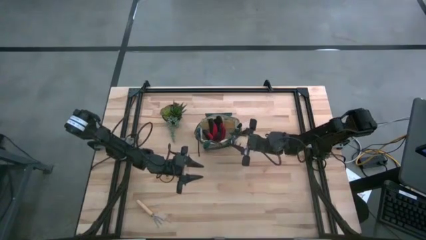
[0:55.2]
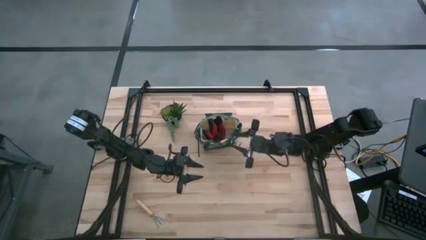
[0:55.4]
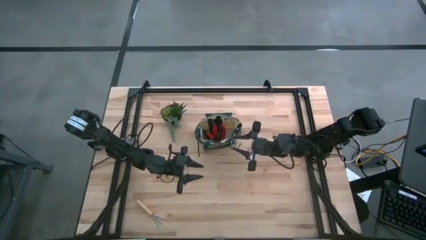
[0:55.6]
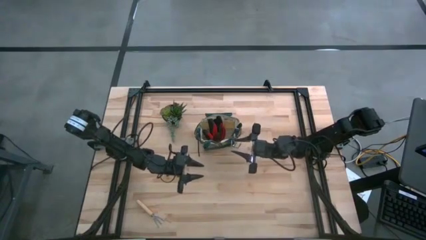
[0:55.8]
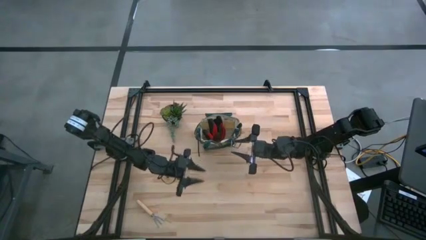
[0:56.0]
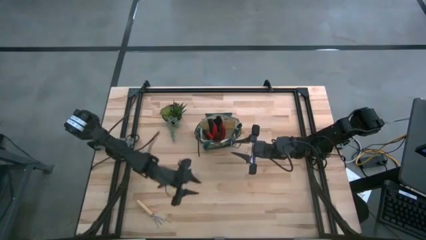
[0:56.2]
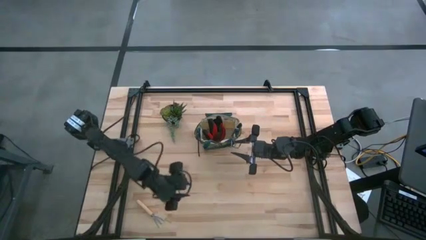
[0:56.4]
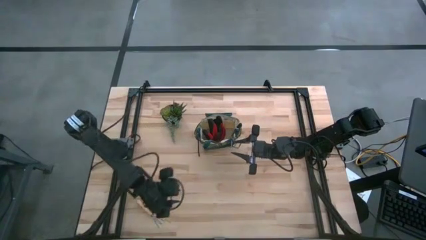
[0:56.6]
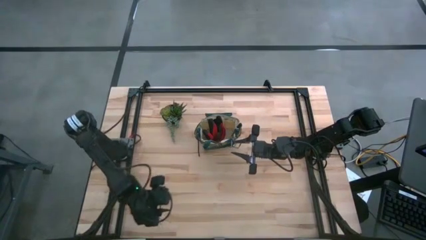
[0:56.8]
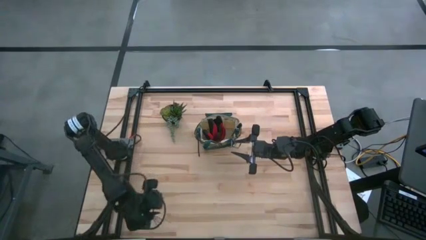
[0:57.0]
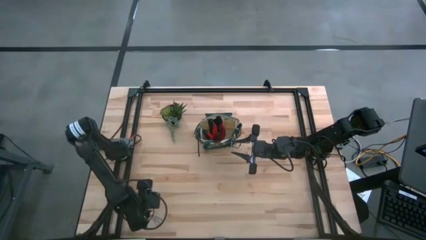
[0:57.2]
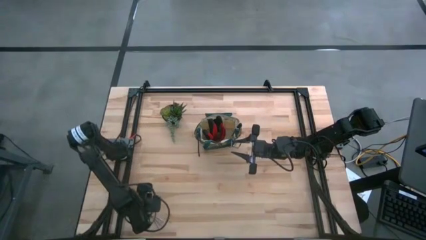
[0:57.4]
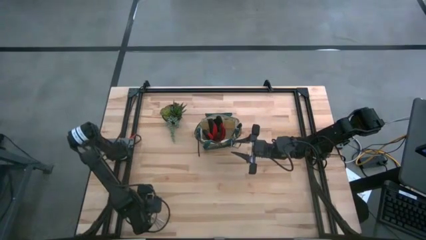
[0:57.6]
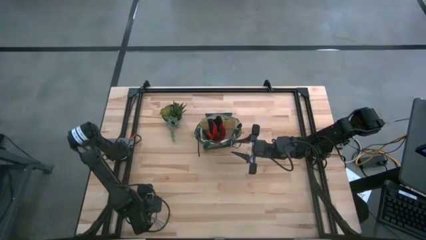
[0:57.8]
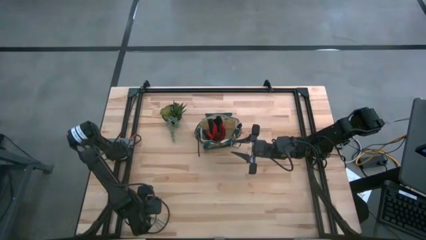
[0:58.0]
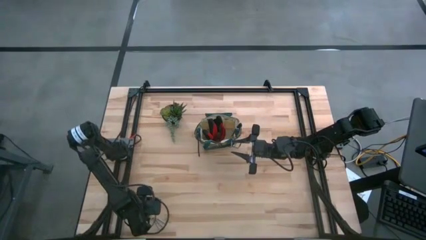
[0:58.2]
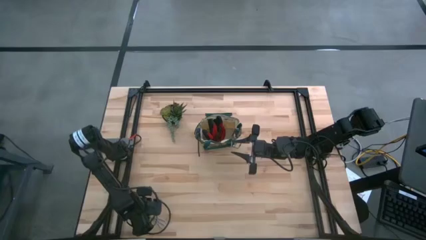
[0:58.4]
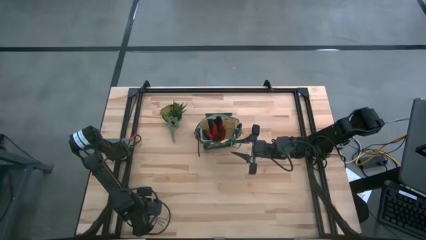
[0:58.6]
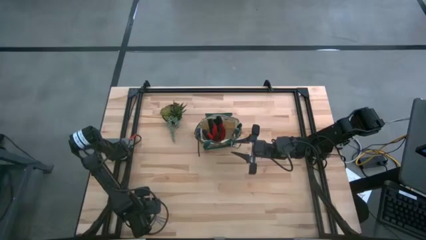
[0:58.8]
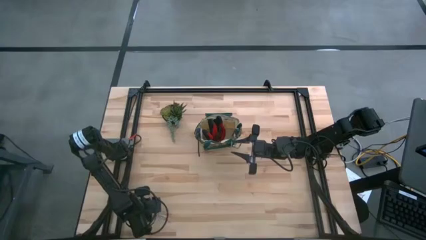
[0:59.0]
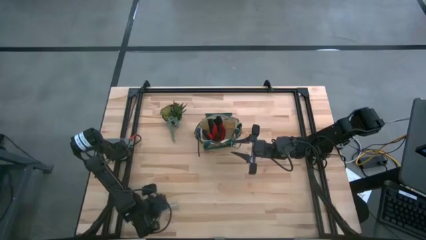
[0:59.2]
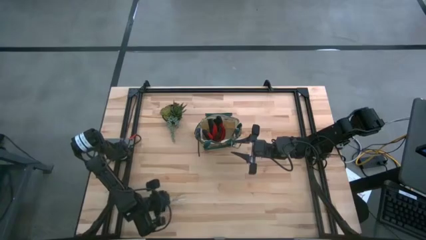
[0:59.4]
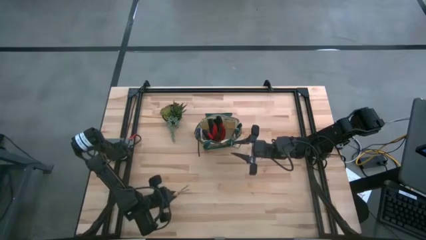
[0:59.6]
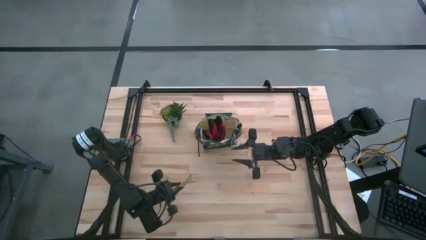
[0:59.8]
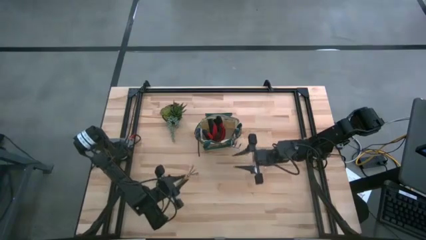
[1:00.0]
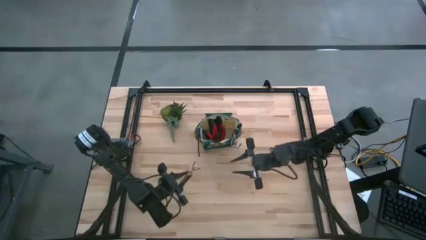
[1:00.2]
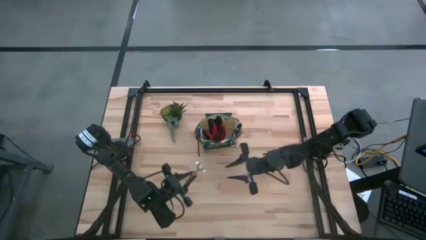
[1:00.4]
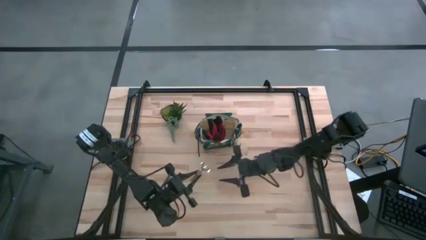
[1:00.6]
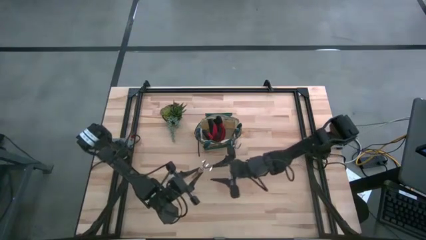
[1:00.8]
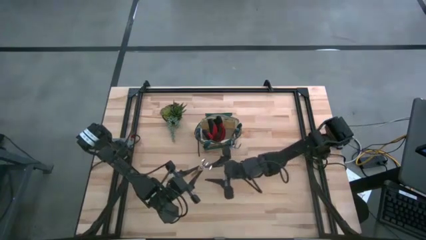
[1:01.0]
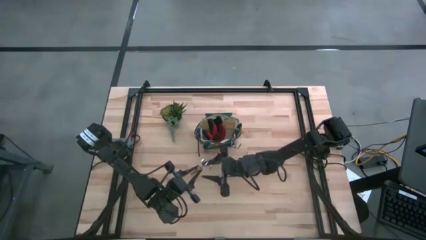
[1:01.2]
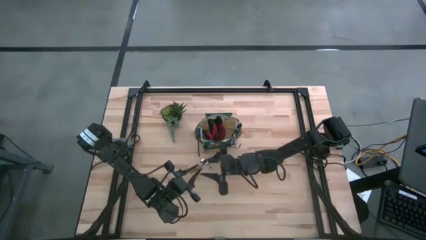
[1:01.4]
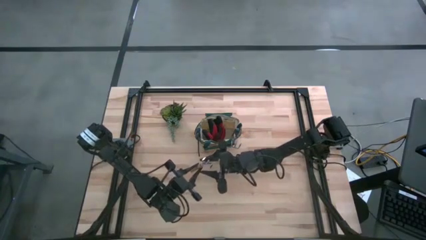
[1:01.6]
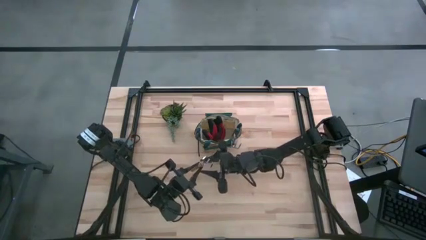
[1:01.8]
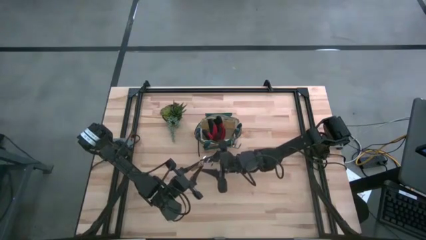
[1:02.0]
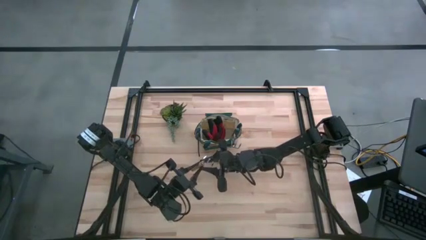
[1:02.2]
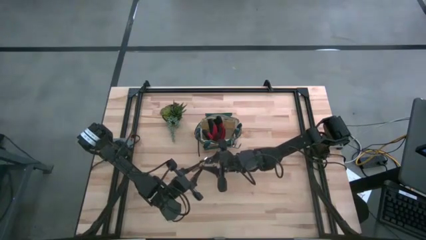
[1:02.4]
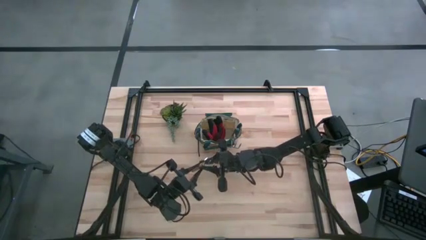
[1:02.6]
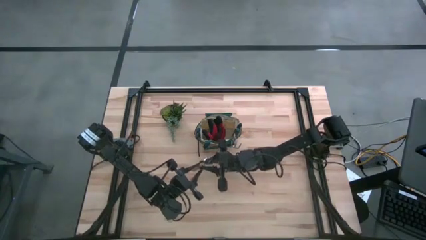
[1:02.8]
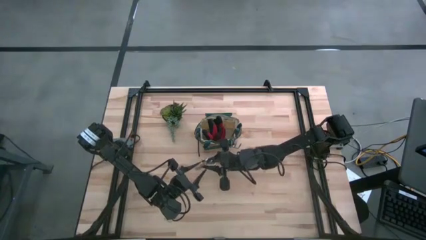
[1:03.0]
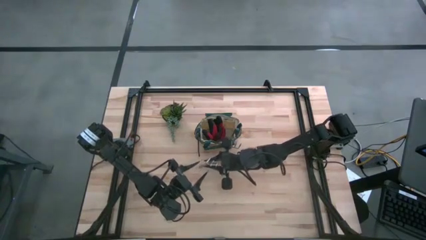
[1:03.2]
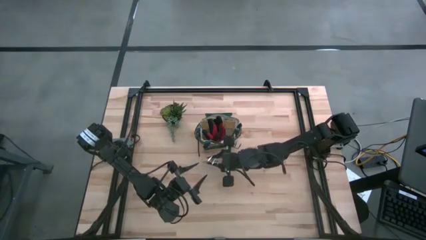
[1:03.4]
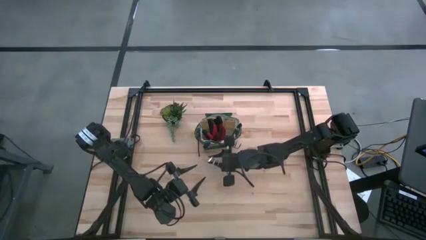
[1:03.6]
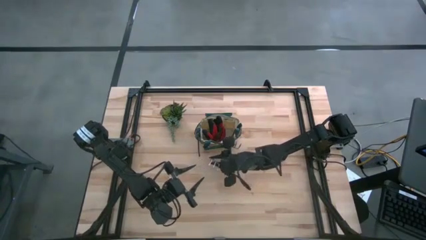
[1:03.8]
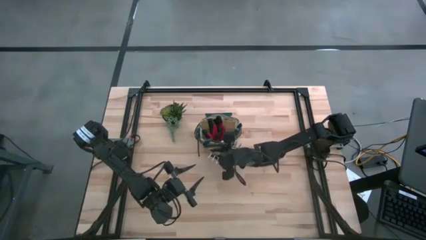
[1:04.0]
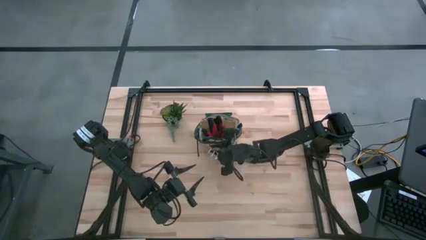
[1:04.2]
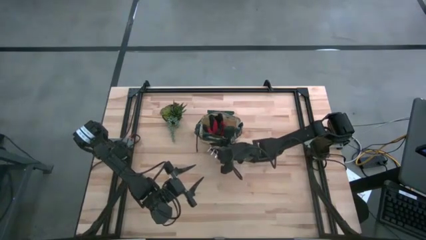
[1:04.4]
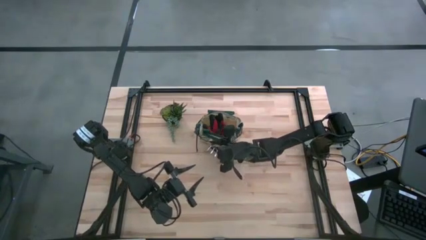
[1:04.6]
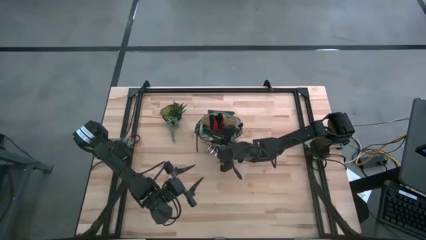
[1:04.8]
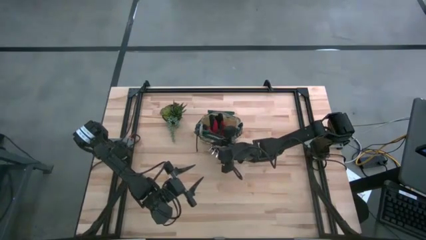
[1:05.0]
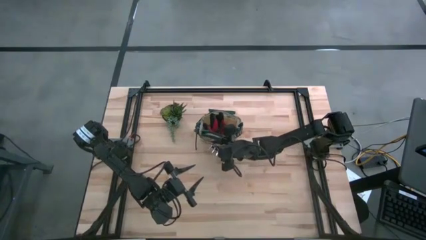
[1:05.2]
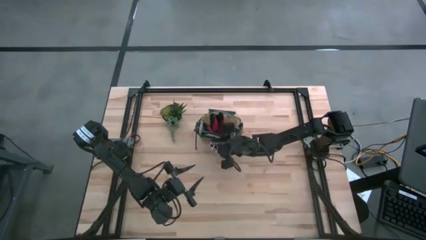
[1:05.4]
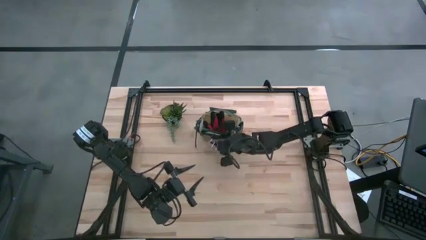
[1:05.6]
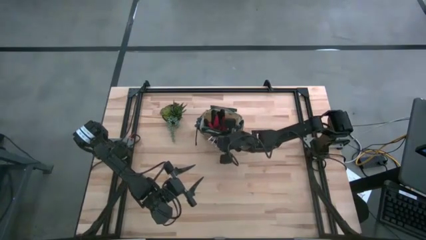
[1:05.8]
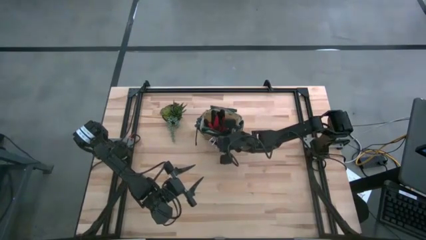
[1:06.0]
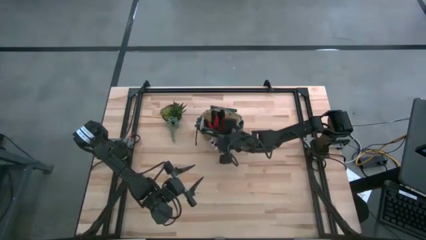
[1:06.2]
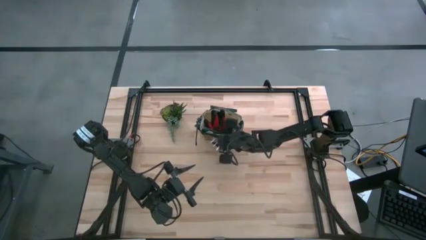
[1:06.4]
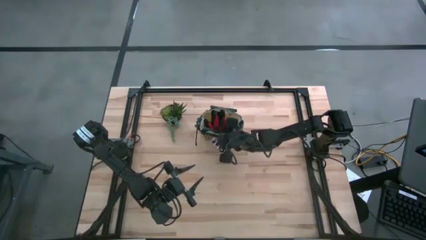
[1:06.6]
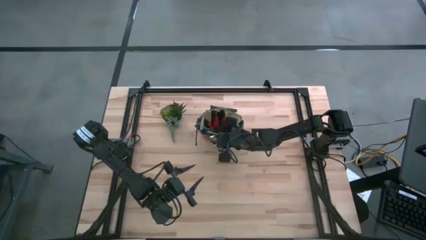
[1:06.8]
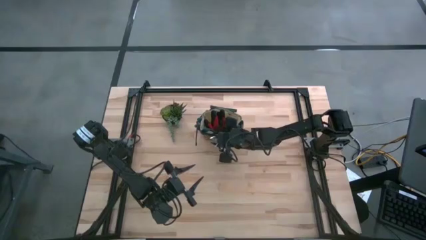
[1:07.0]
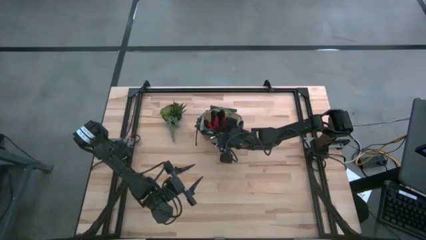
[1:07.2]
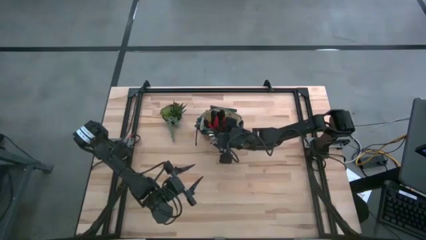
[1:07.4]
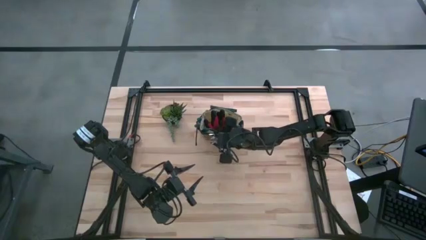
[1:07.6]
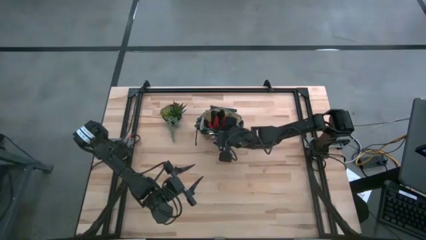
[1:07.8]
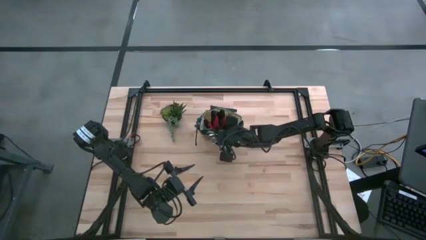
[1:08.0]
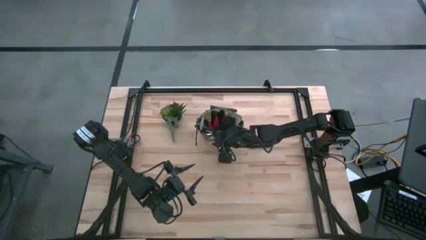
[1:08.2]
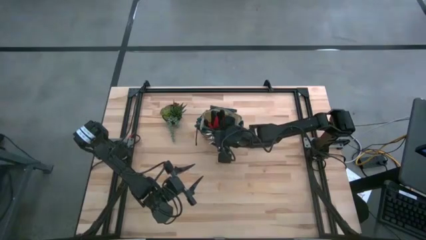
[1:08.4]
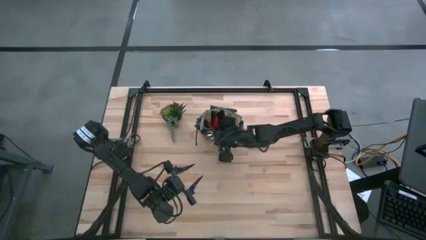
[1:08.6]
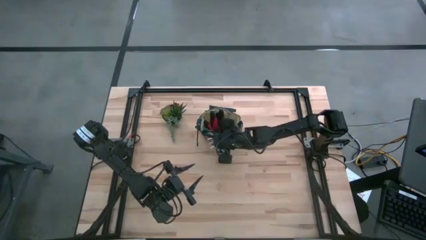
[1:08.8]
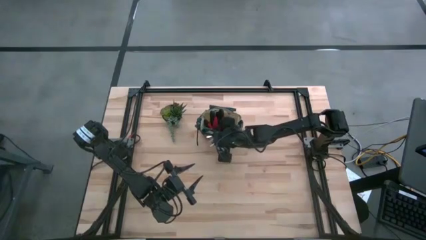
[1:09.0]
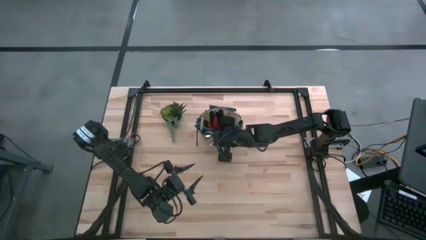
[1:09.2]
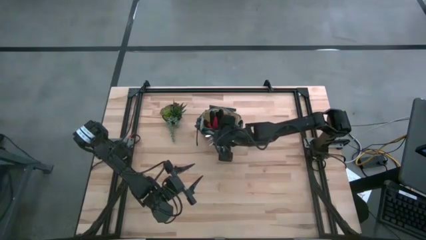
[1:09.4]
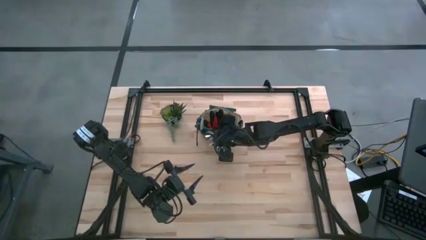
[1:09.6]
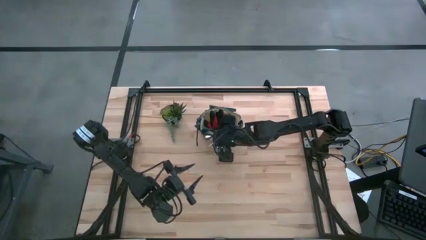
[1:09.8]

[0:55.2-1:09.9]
Task: Pick & Place Garden tools in Gardening bag
Put the brown hand rake into the white gardening bag
